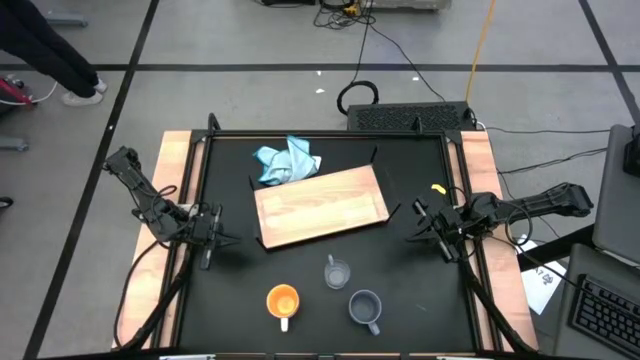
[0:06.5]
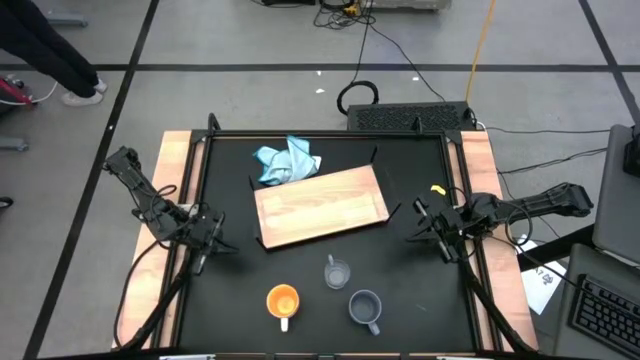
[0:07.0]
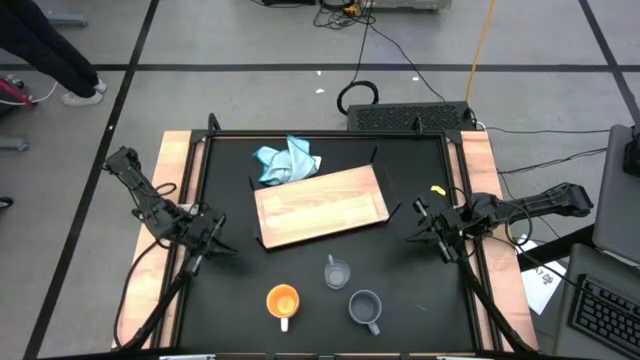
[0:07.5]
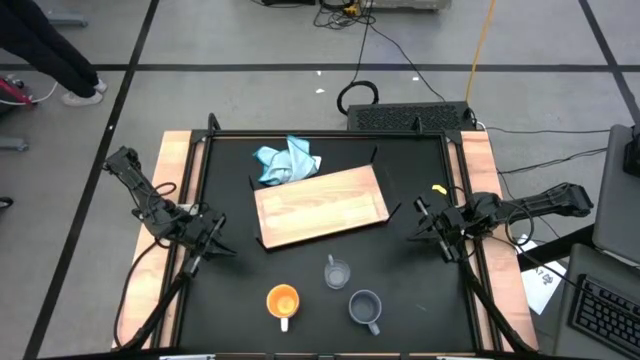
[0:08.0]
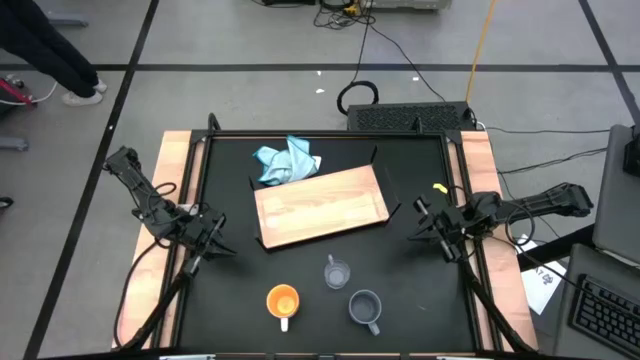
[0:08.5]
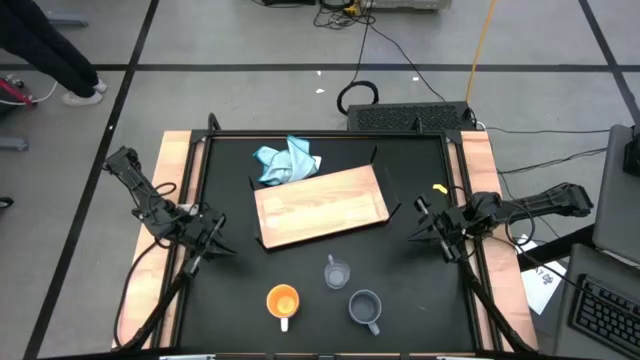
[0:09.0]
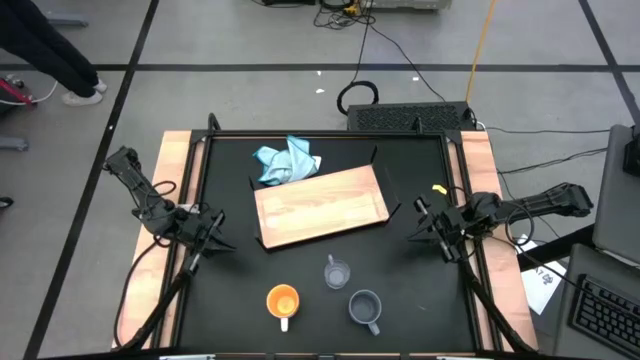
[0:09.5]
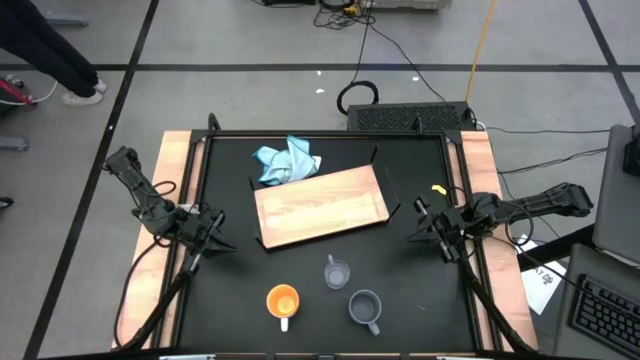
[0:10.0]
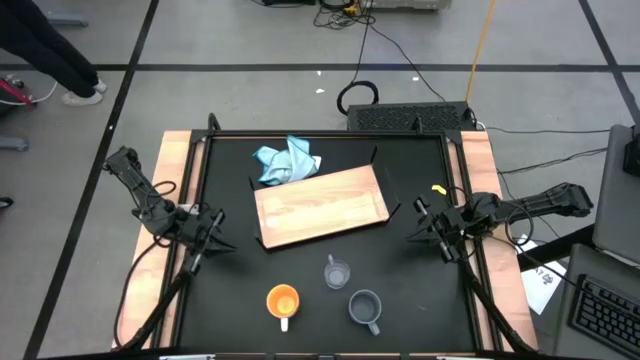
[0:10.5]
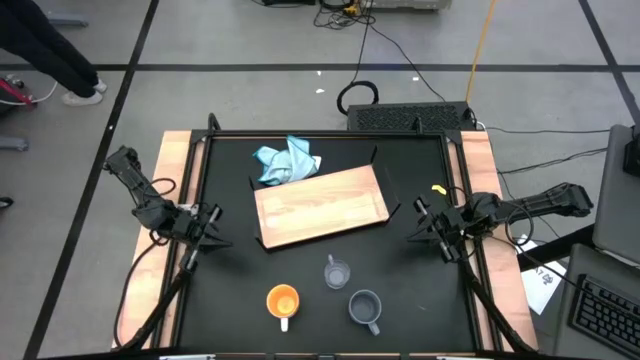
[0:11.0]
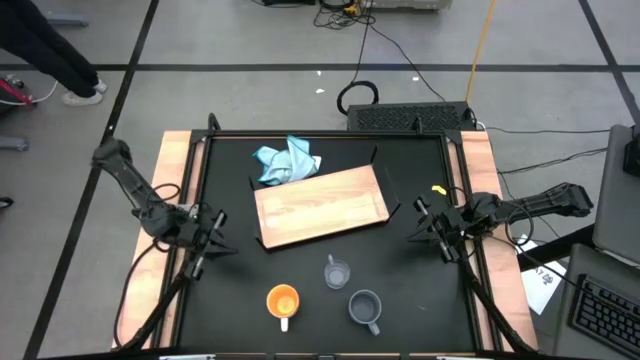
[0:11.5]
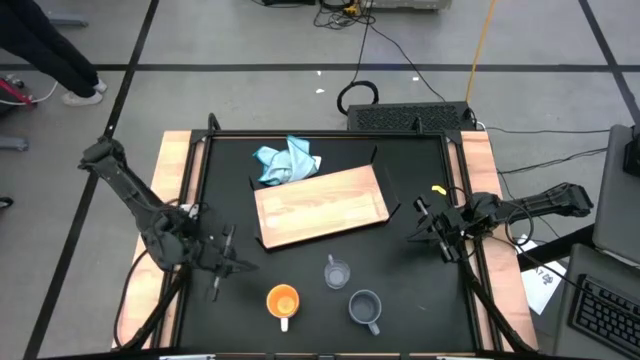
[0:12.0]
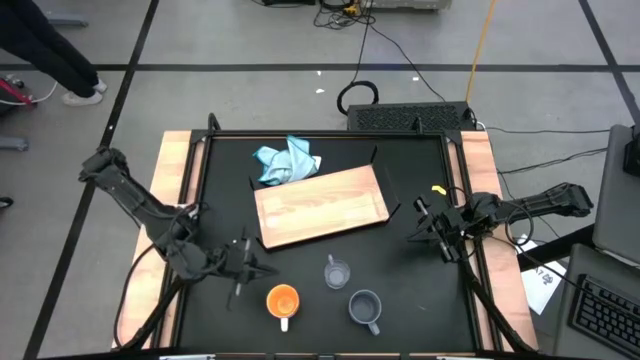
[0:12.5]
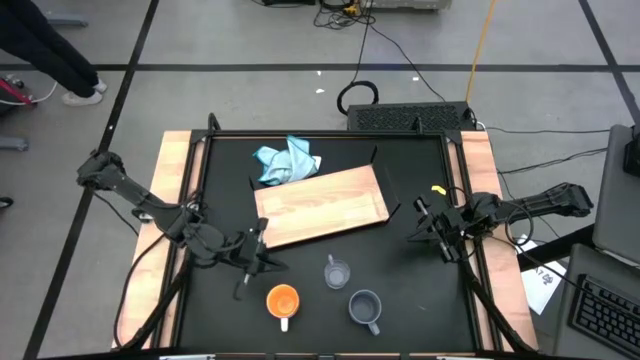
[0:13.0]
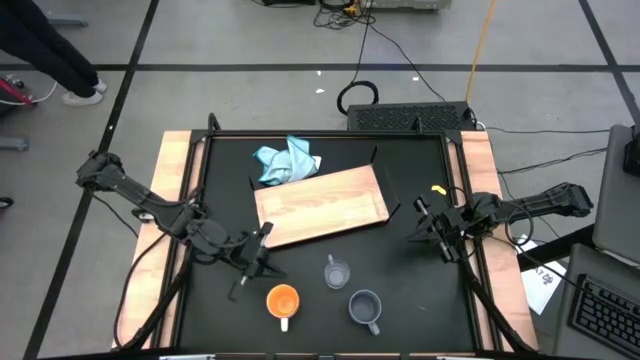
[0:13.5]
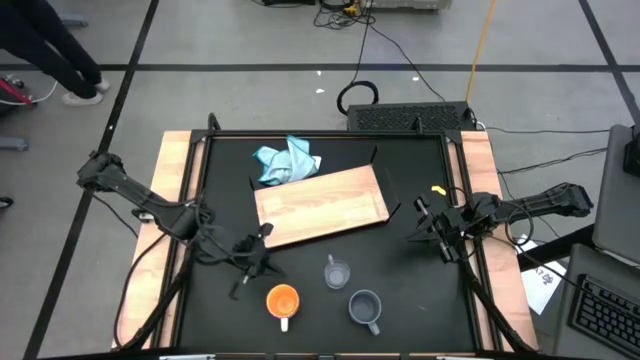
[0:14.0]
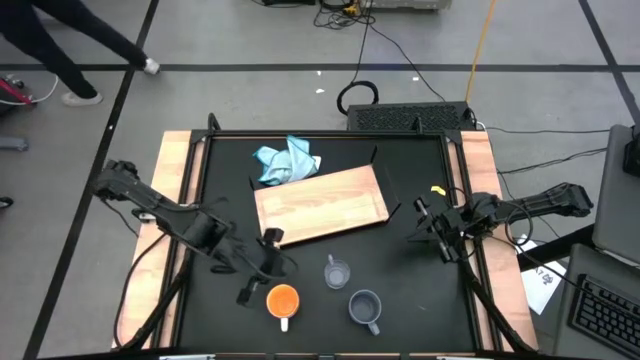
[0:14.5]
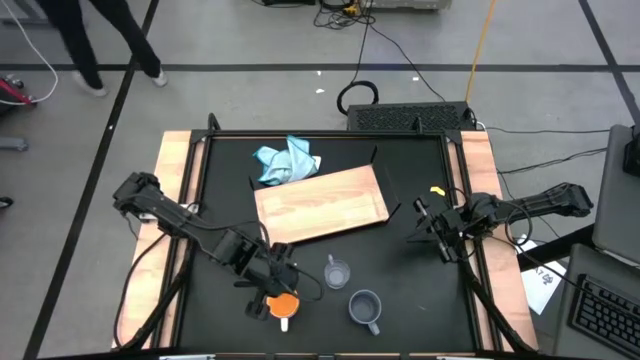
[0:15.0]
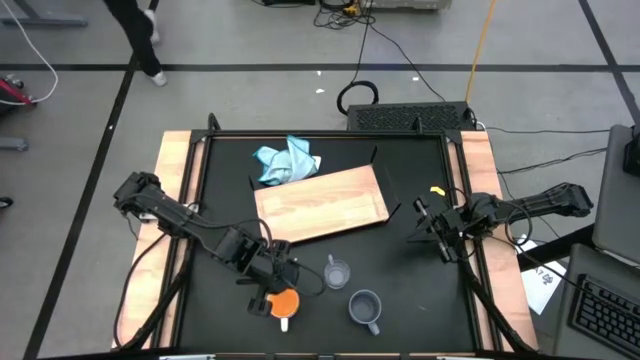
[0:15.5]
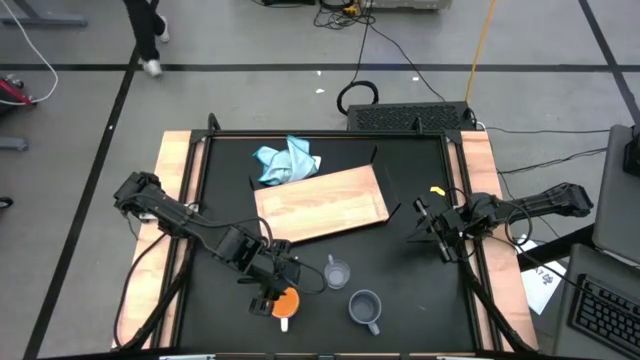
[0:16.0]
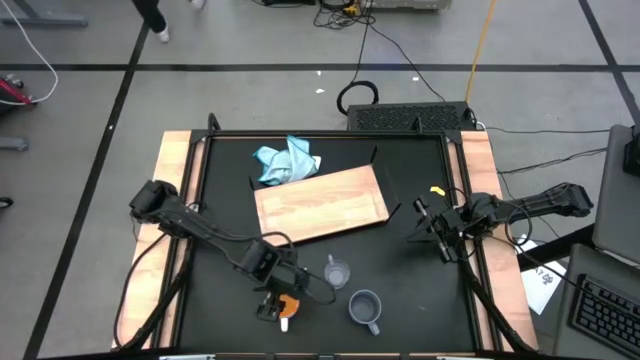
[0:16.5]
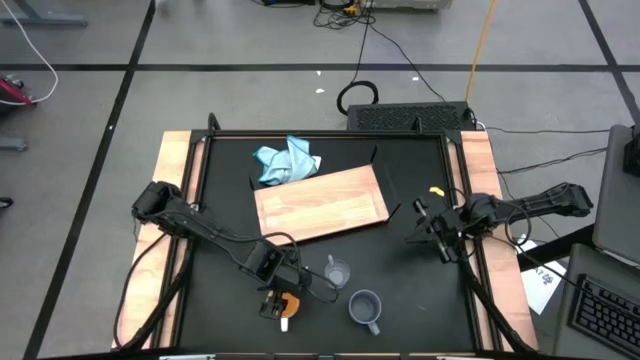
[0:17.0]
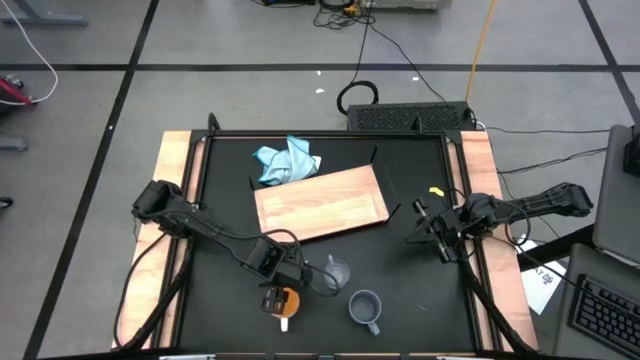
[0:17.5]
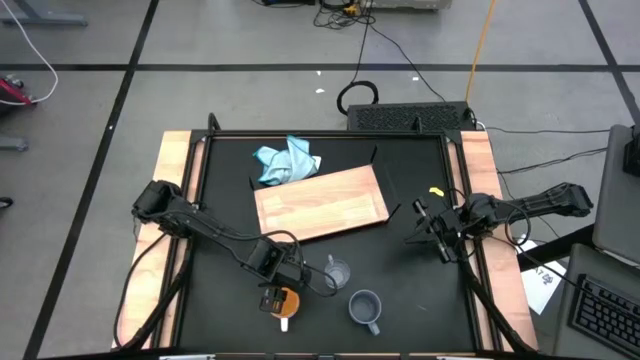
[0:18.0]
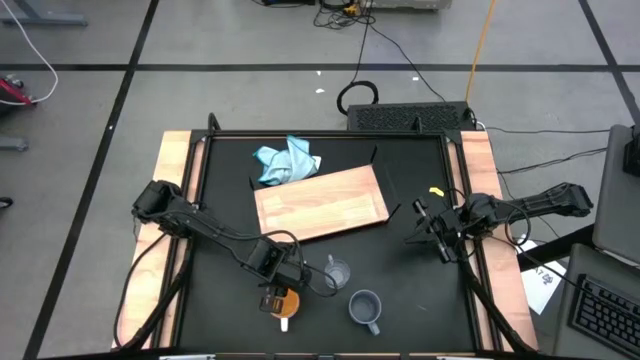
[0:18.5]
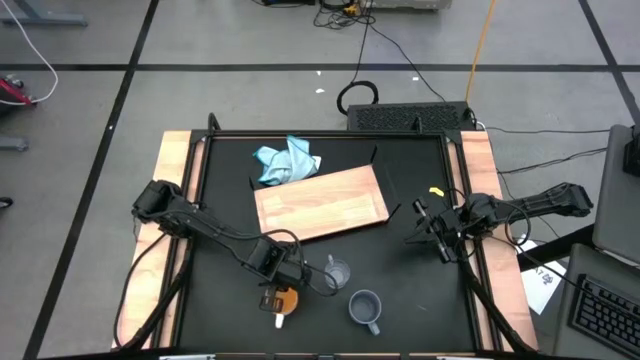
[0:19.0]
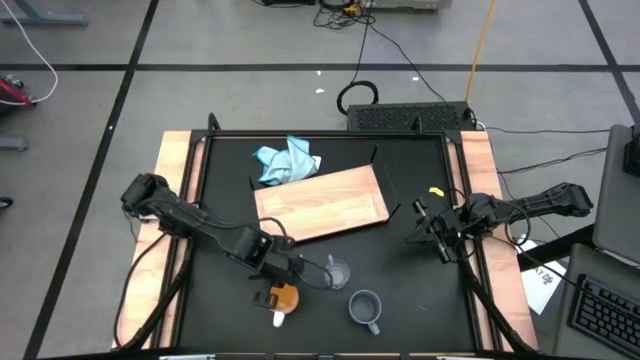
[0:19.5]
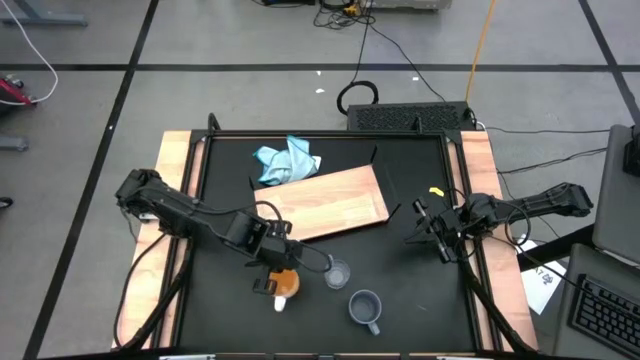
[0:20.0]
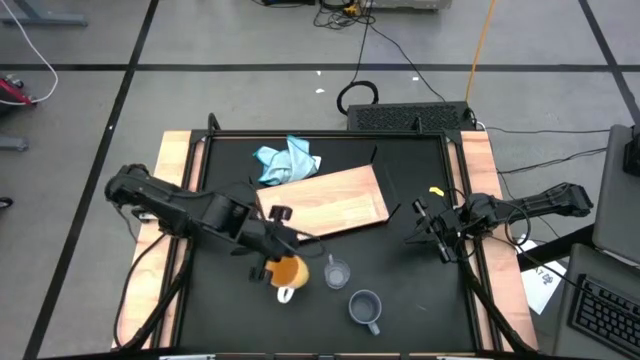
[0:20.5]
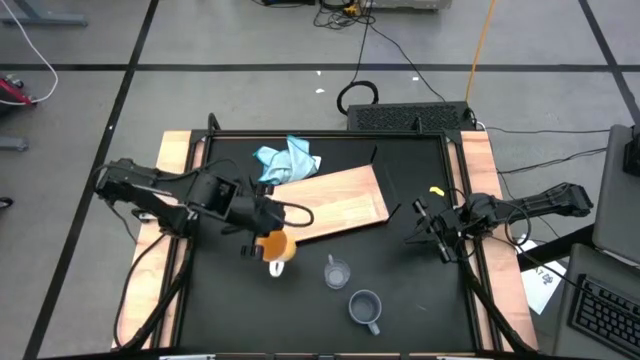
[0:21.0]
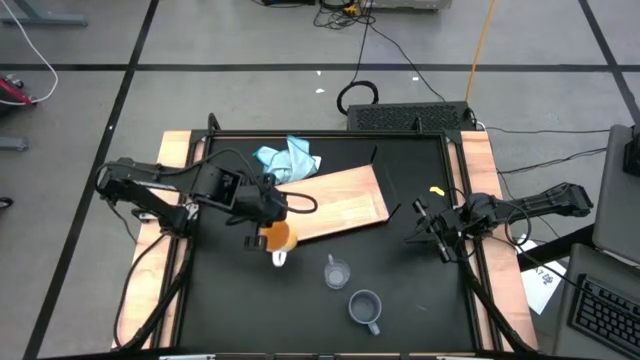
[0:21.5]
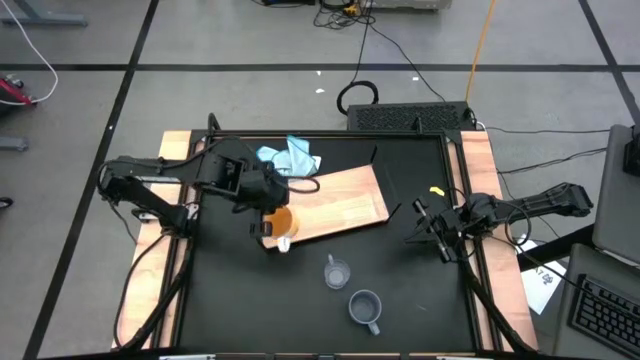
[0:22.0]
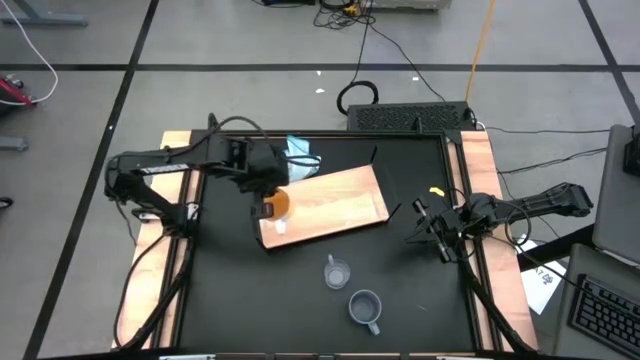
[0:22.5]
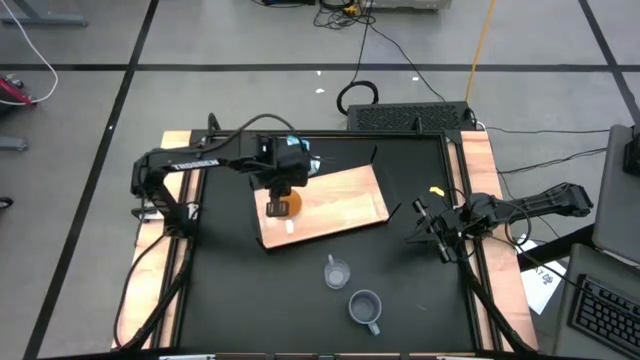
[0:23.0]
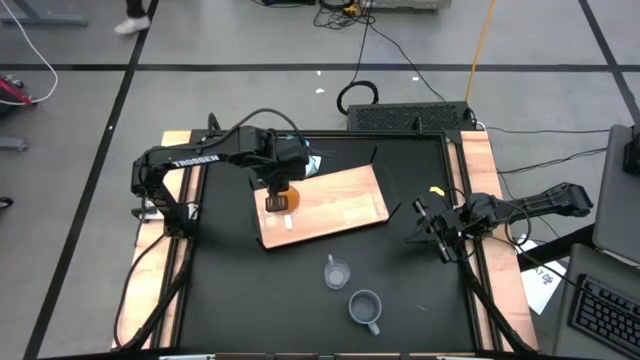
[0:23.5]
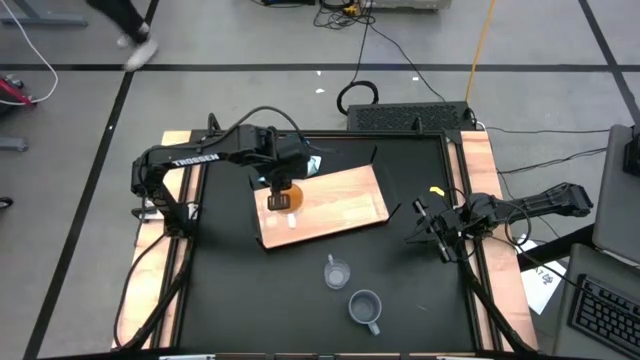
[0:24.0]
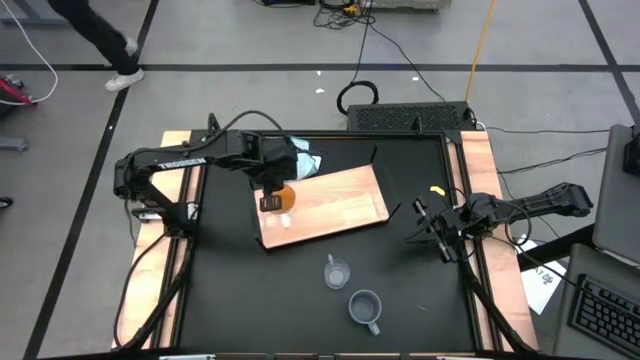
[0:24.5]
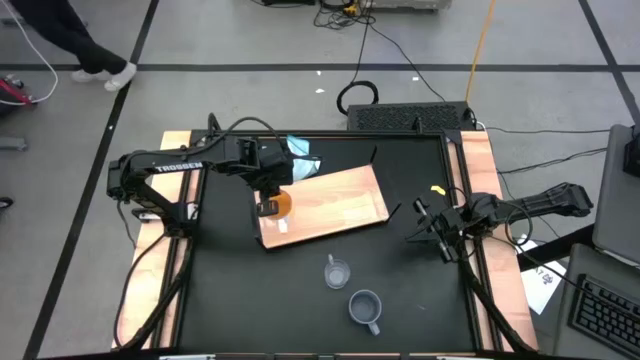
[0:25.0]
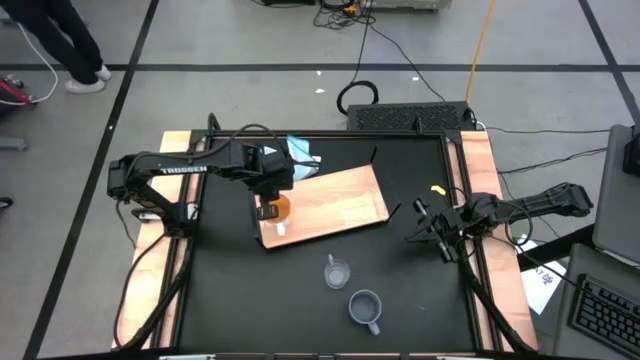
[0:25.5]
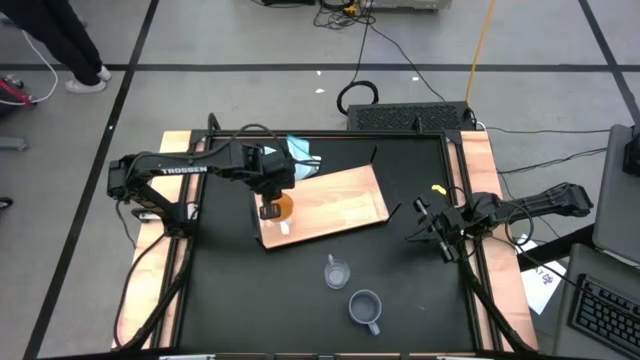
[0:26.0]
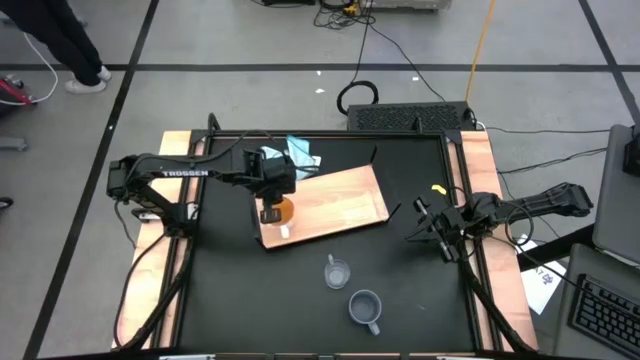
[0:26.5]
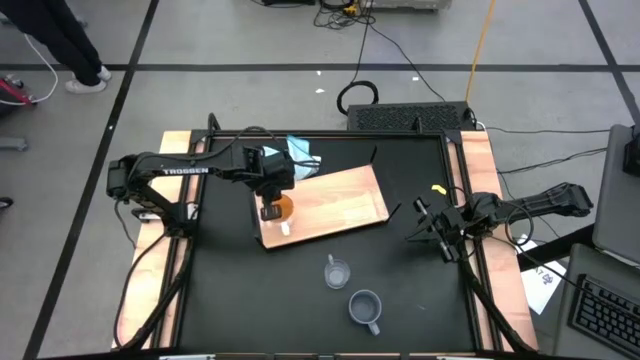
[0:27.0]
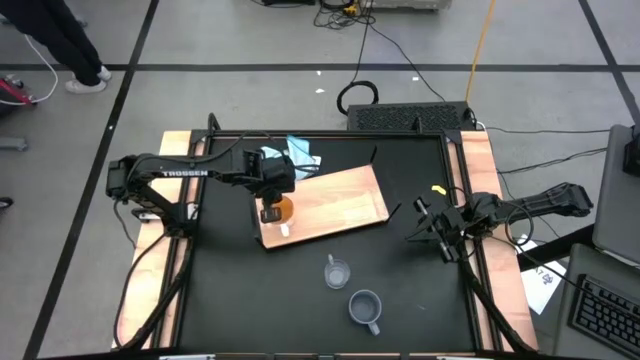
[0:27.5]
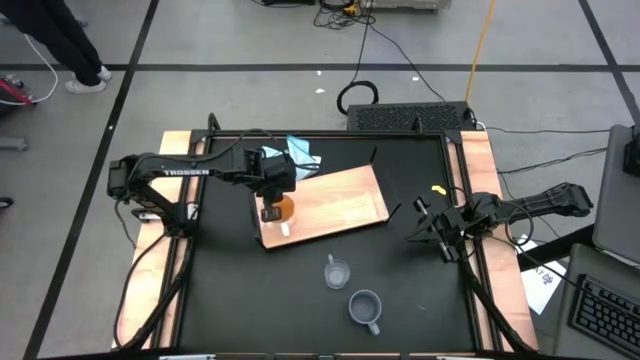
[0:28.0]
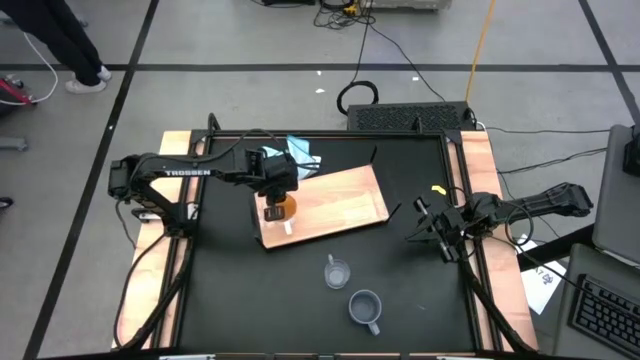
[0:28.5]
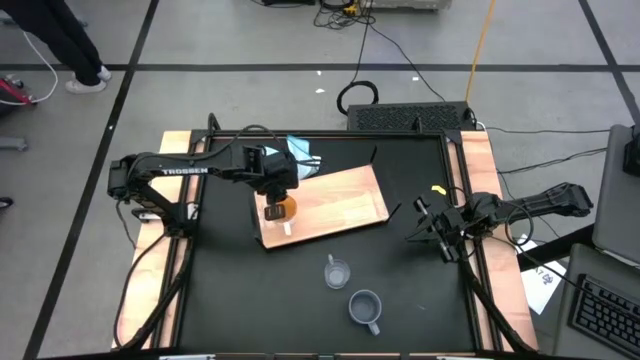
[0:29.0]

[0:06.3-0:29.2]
Task: Stack small to large cups/mugs on shelf
Put the yellow mug on the shelf
